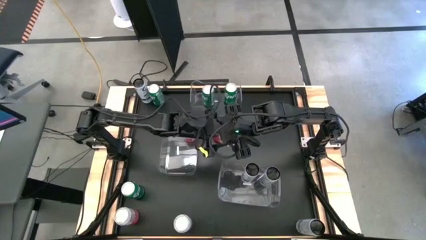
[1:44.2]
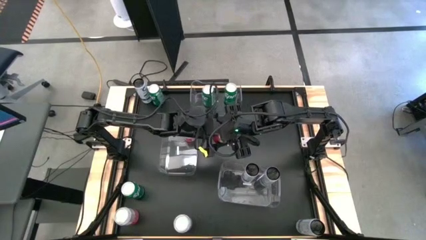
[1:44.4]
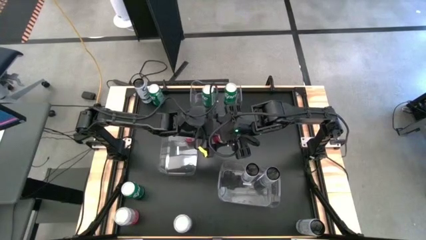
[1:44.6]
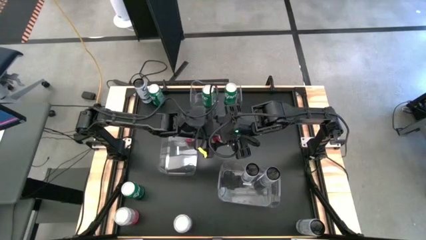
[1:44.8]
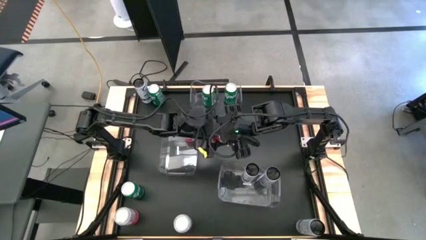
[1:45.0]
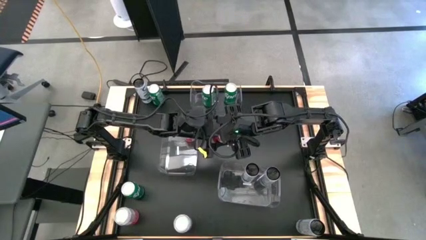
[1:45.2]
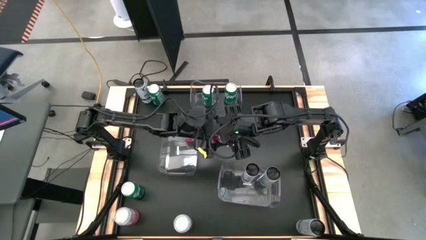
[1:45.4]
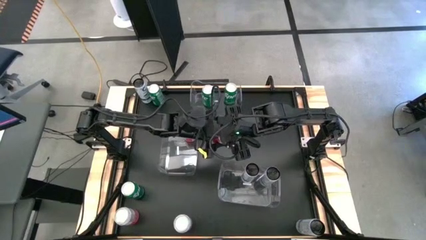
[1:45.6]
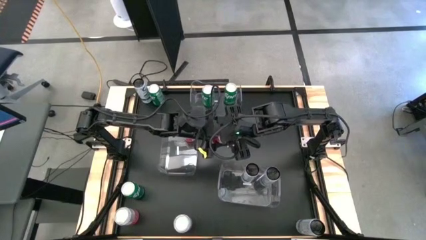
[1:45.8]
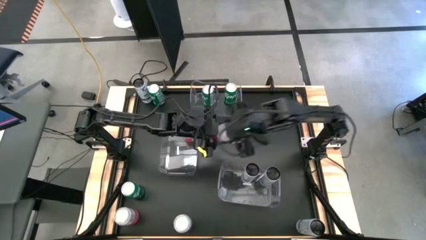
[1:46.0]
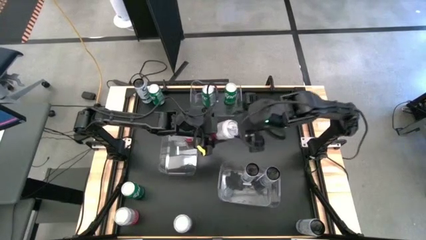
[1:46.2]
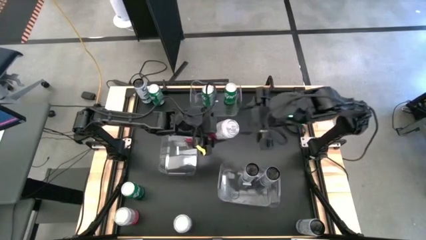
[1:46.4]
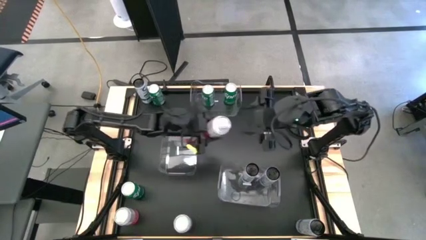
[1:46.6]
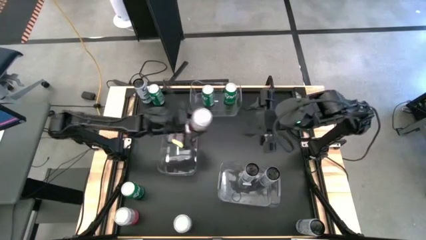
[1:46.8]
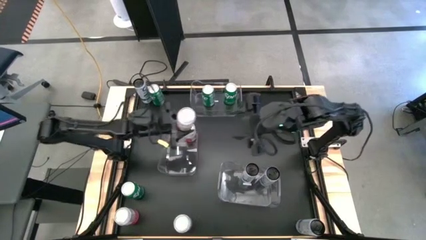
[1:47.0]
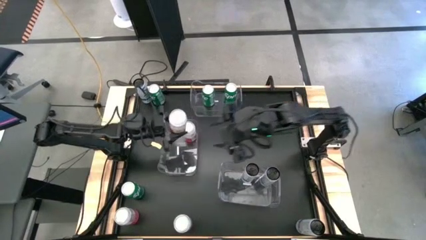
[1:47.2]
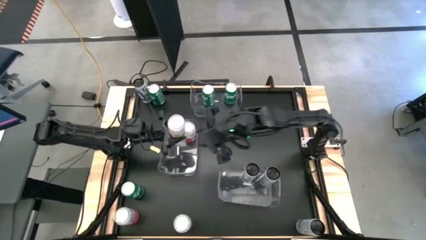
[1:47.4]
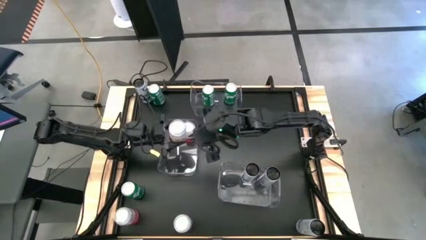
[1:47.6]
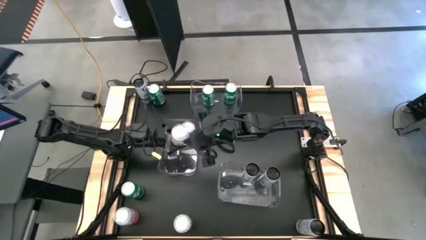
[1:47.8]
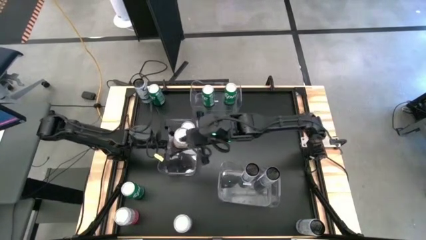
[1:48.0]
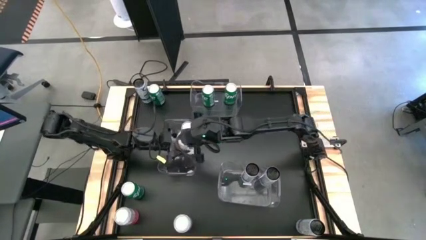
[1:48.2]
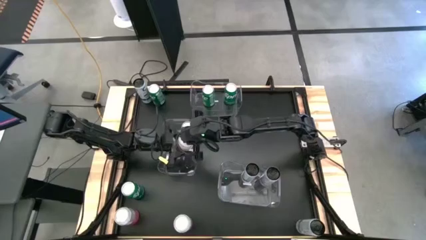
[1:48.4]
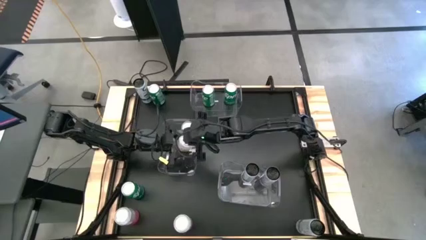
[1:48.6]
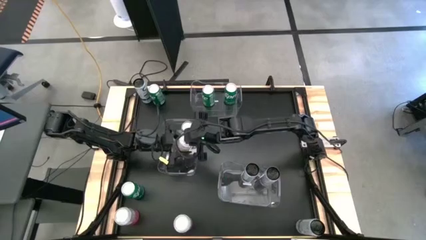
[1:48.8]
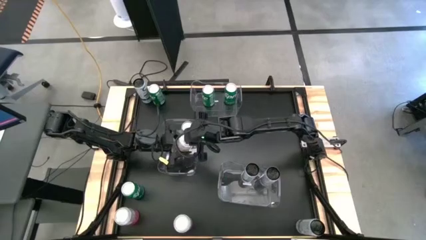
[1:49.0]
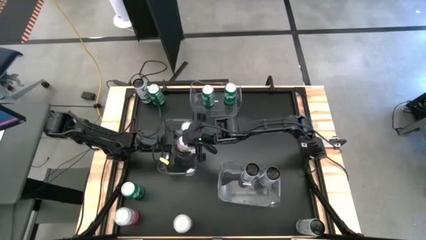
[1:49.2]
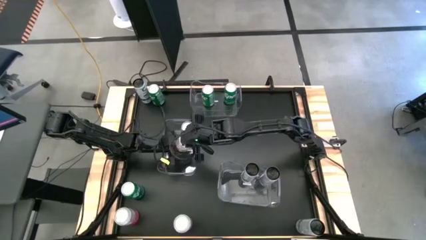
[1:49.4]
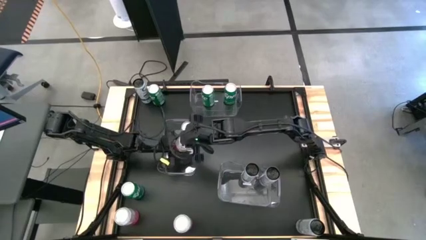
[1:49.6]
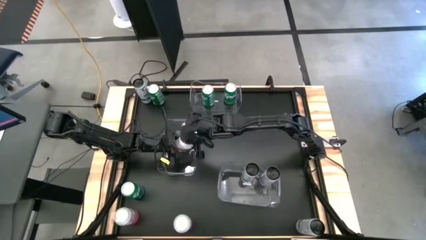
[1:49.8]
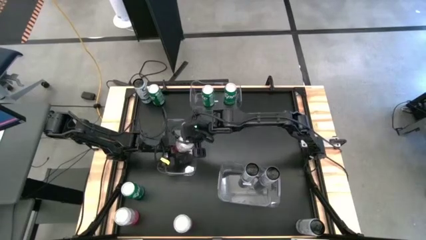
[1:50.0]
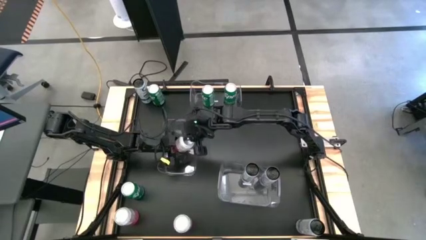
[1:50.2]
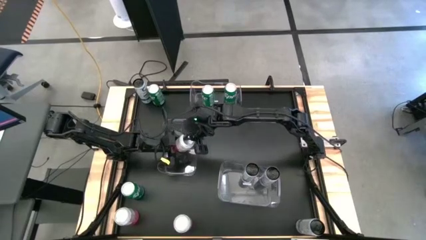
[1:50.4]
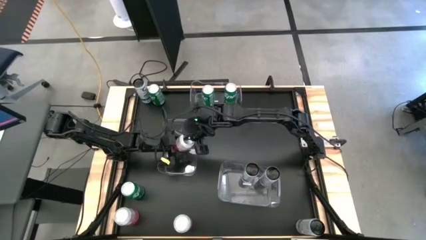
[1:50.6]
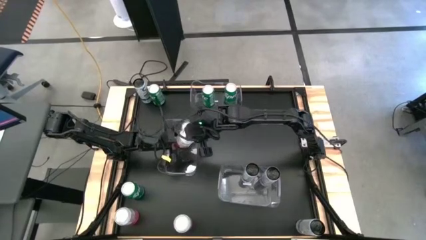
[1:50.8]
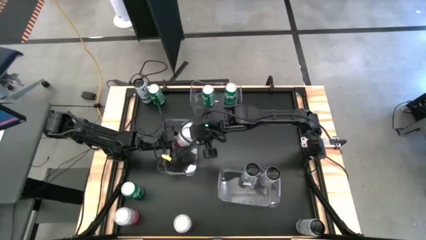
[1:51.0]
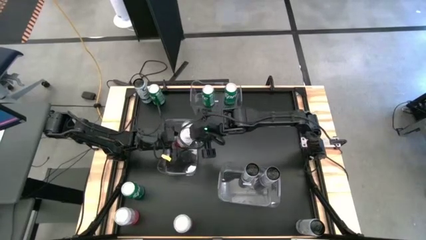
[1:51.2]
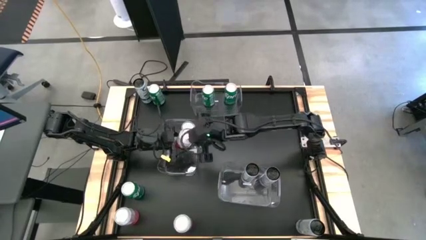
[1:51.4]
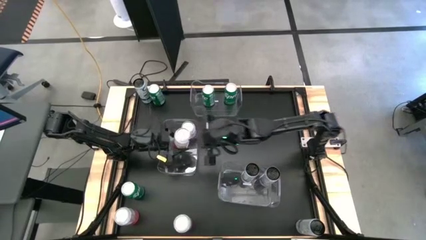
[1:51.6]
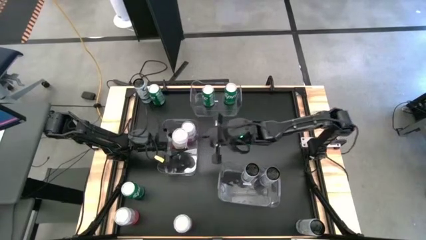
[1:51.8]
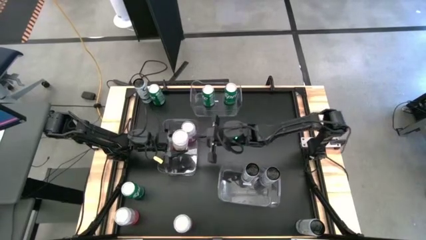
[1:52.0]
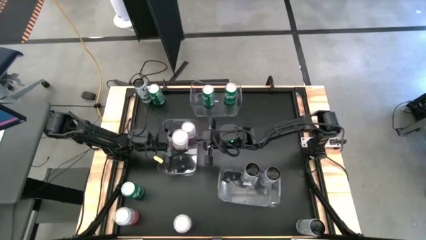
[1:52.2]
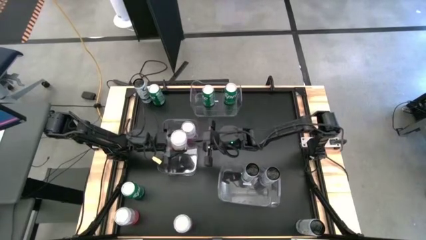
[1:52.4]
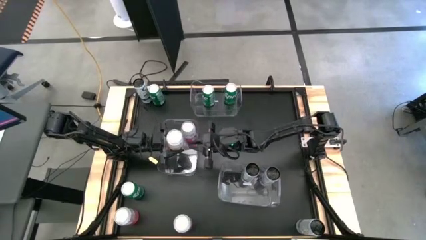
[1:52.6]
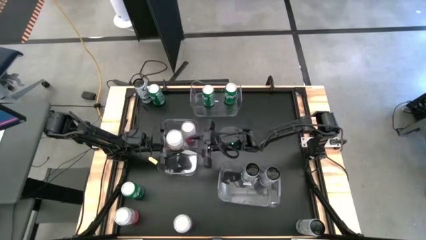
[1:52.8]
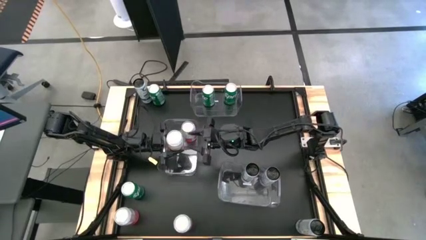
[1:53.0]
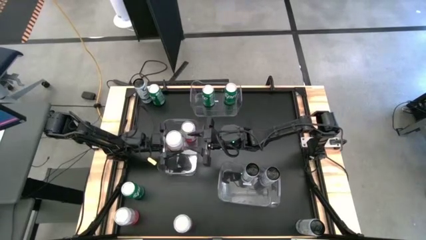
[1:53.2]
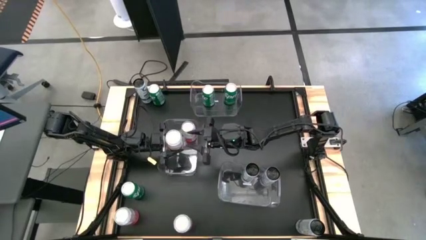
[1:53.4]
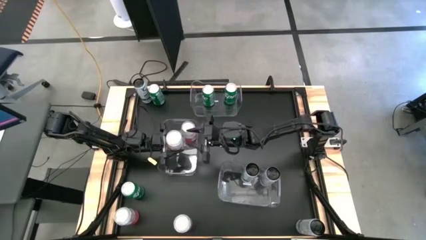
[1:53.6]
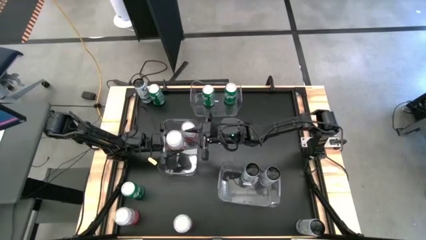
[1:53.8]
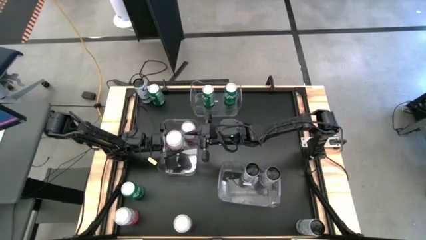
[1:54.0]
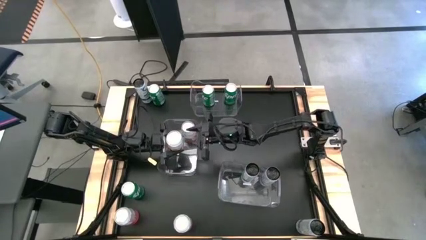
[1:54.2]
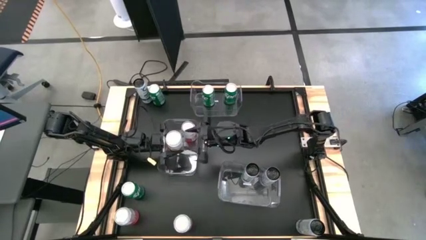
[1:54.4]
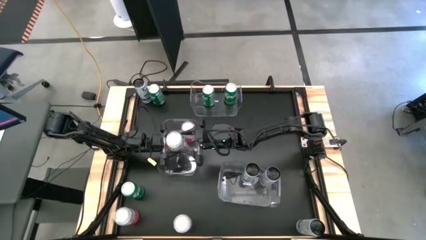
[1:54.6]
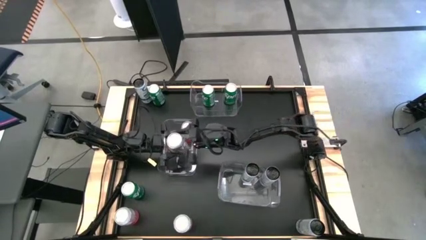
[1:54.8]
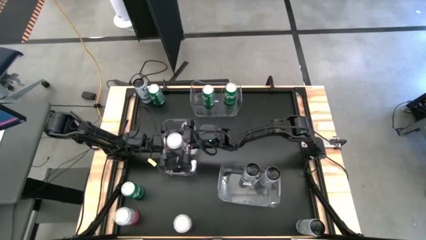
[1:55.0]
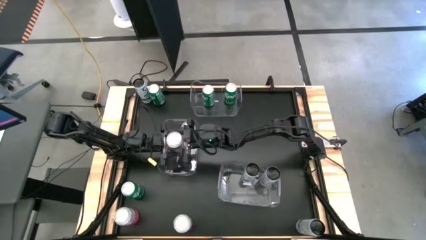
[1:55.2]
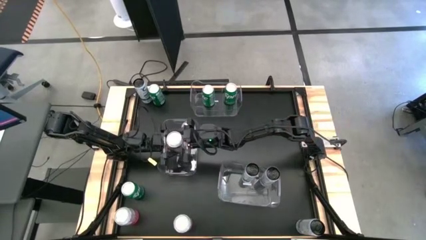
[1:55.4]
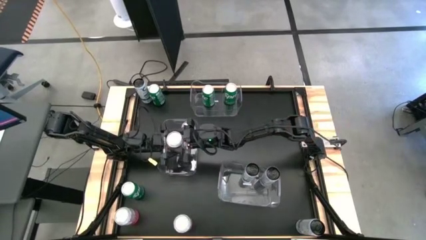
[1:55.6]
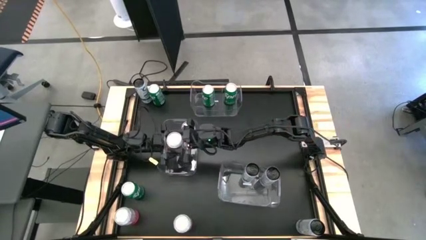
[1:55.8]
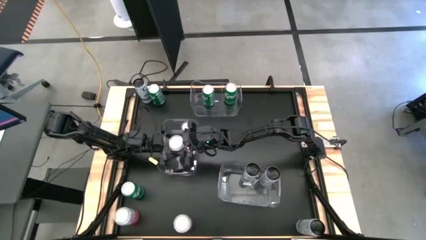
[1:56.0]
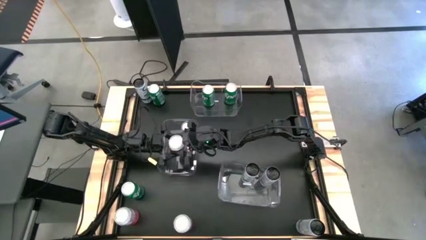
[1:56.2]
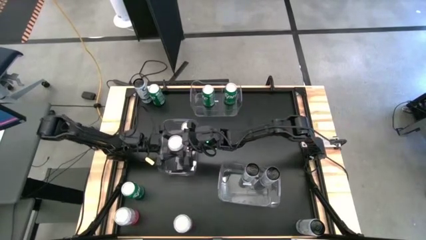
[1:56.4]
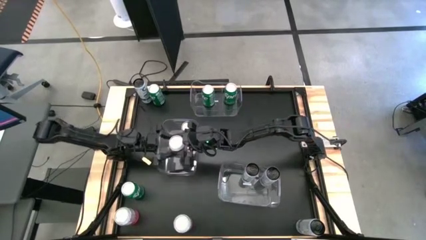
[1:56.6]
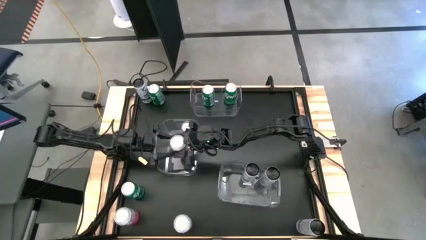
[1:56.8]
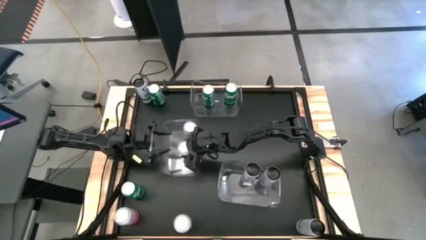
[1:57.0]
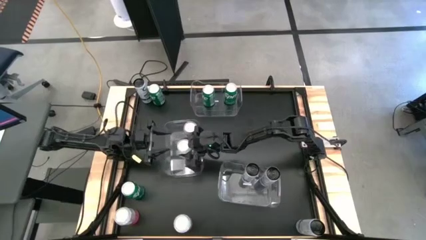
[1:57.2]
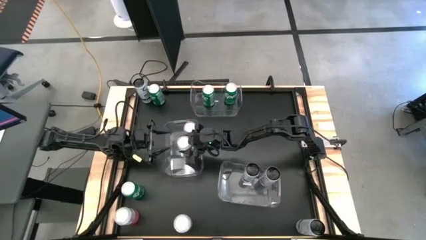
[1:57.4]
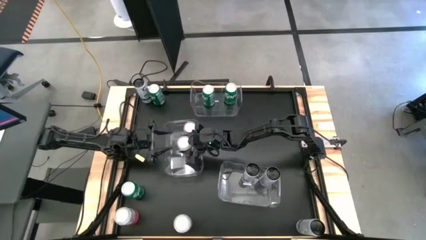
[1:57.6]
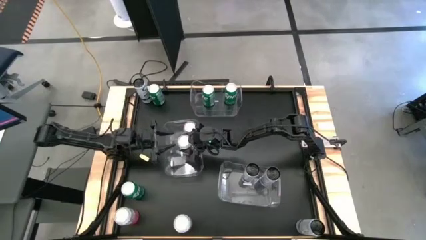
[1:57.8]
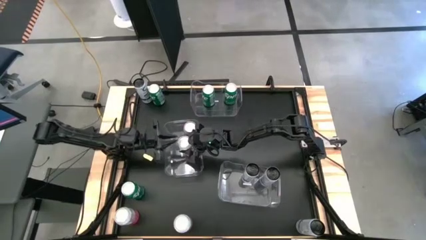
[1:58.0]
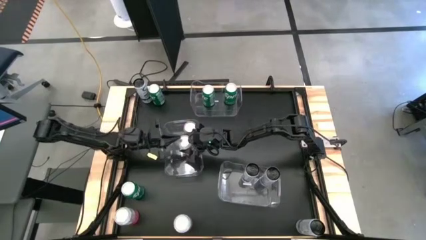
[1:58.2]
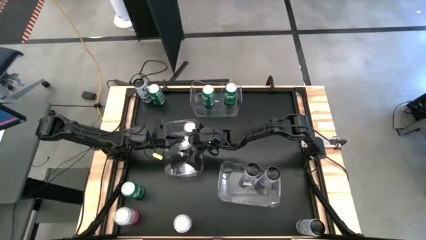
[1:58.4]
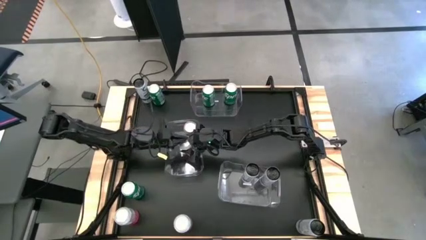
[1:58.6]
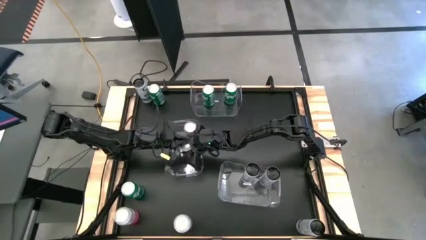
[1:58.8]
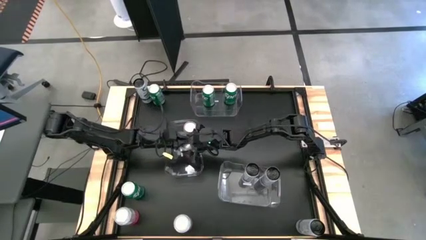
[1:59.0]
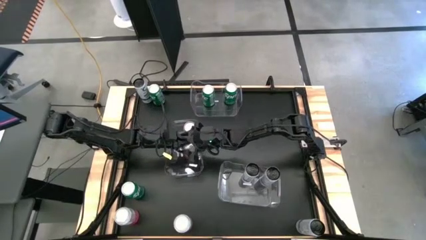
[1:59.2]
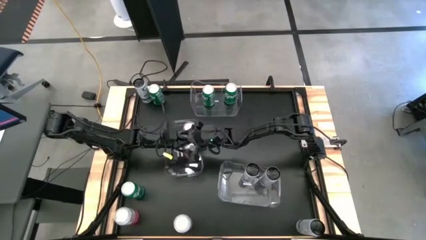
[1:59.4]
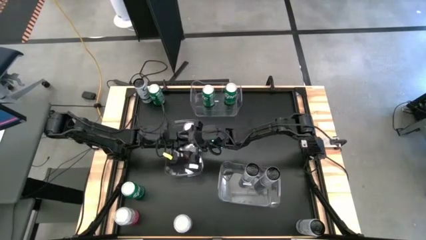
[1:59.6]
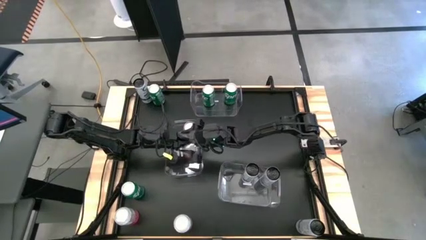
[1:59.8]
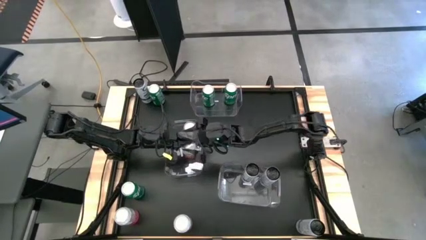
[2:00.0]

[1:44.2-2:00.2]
Task: Sort soda cans
Put the pink soda can into the middle transparent bin
